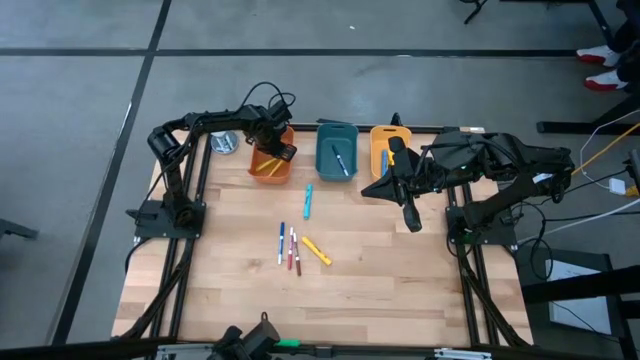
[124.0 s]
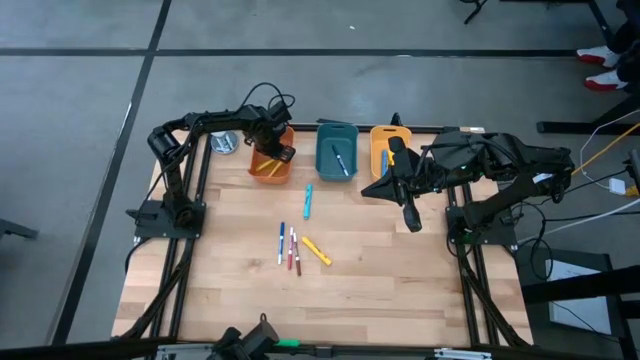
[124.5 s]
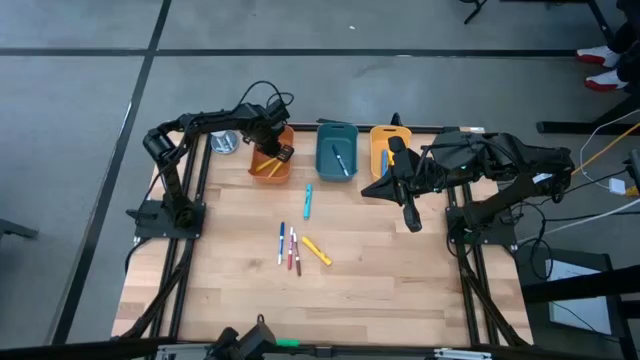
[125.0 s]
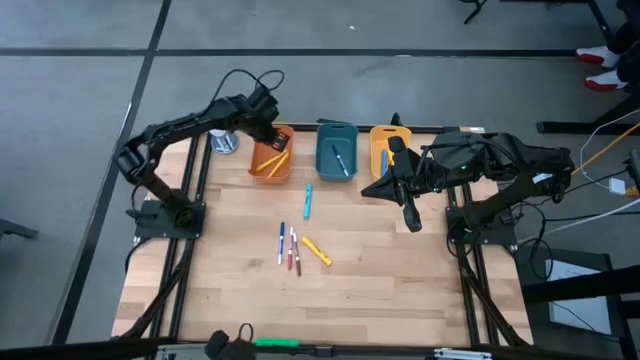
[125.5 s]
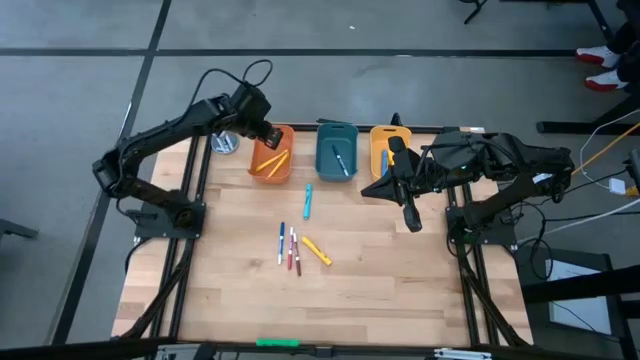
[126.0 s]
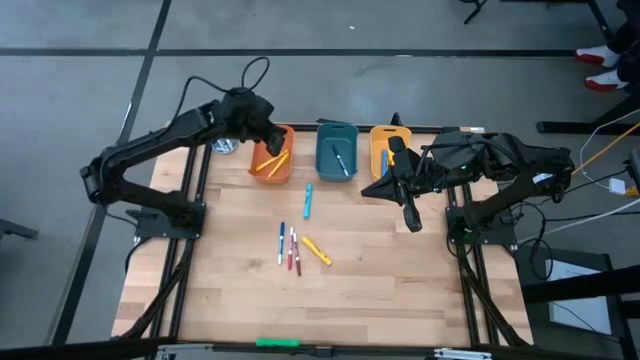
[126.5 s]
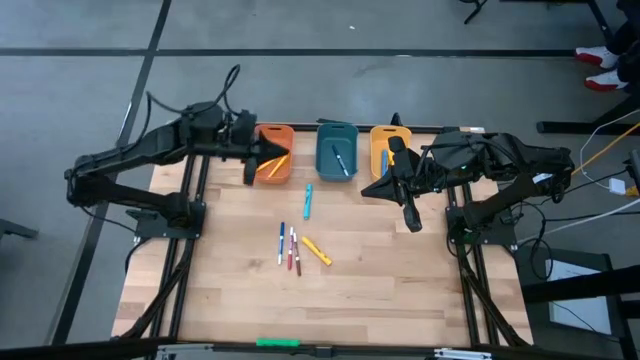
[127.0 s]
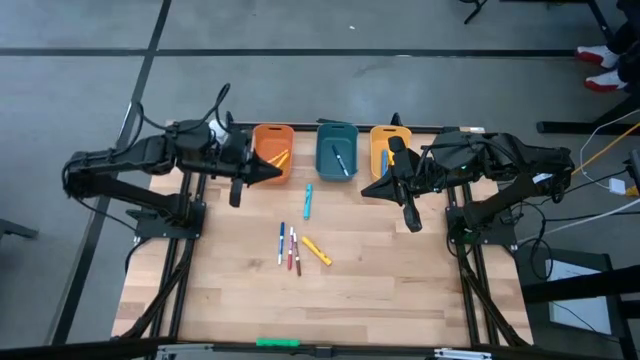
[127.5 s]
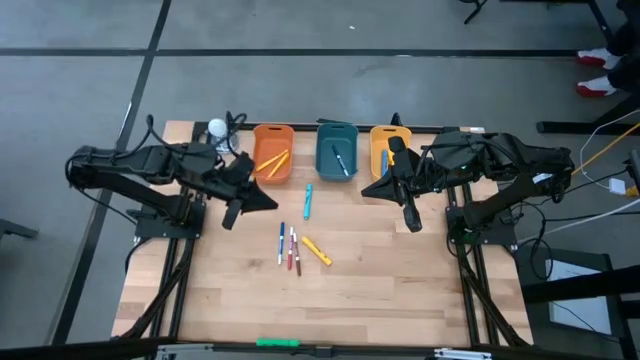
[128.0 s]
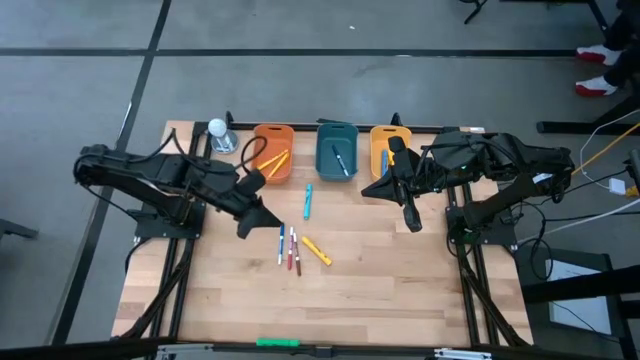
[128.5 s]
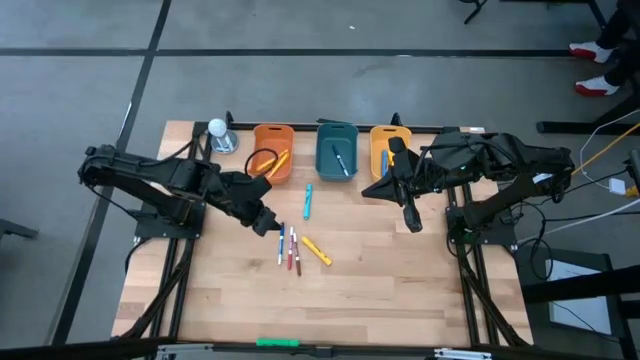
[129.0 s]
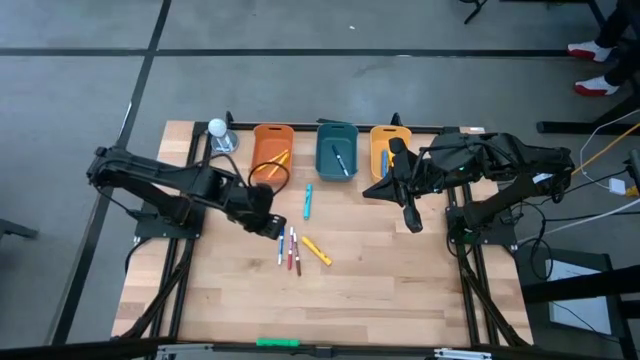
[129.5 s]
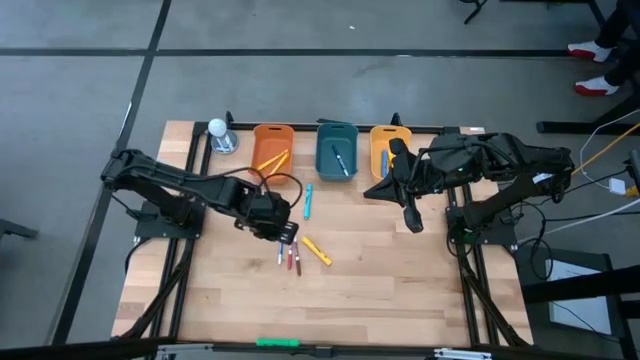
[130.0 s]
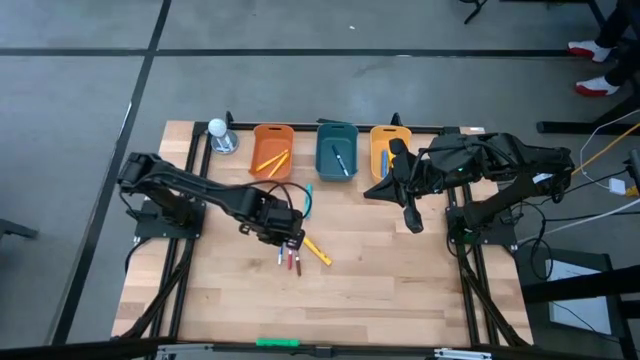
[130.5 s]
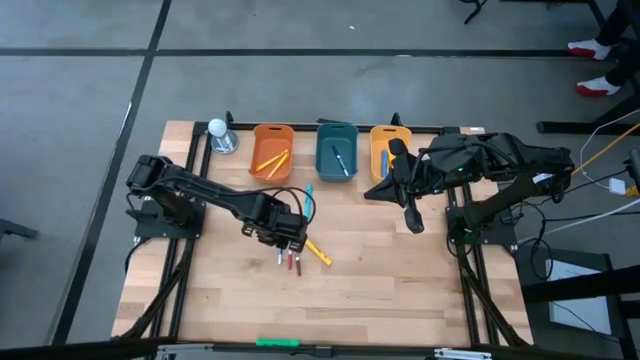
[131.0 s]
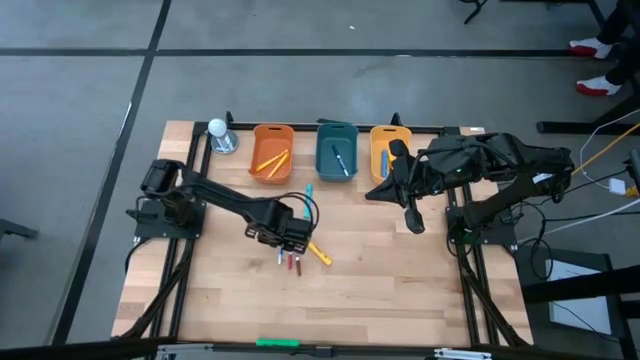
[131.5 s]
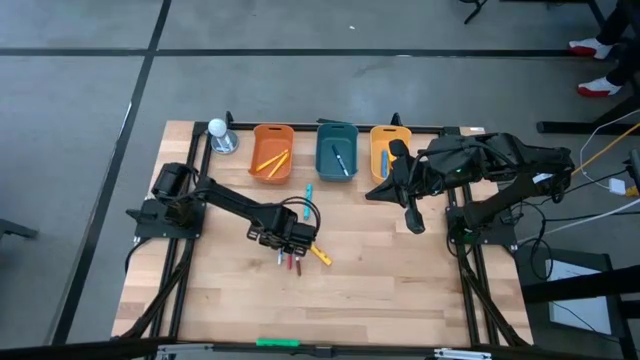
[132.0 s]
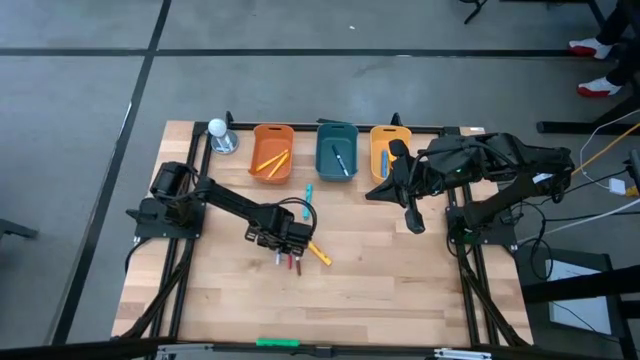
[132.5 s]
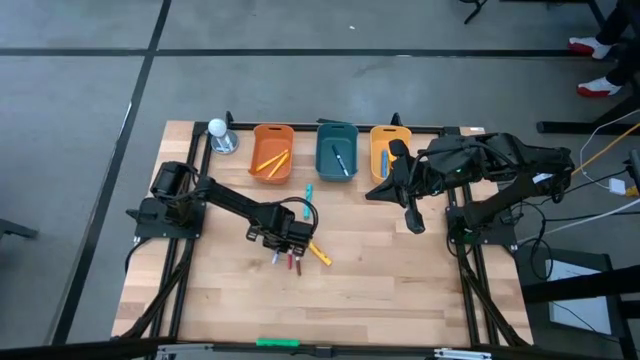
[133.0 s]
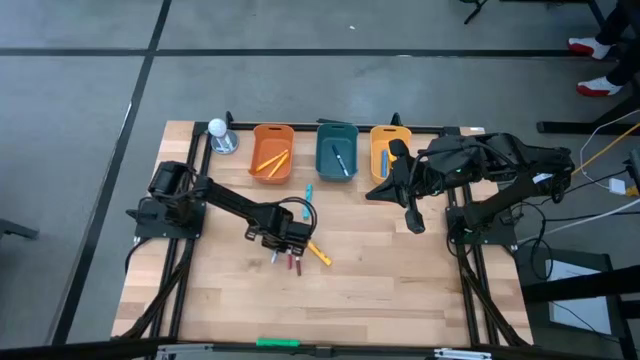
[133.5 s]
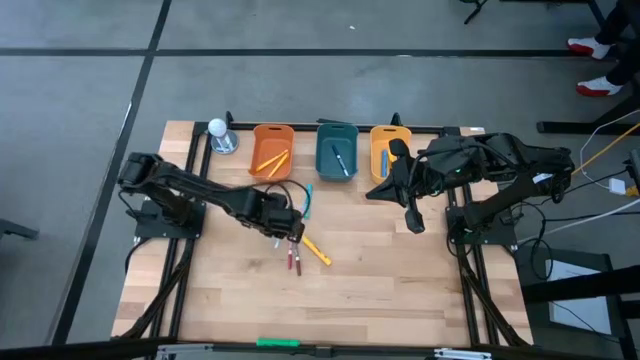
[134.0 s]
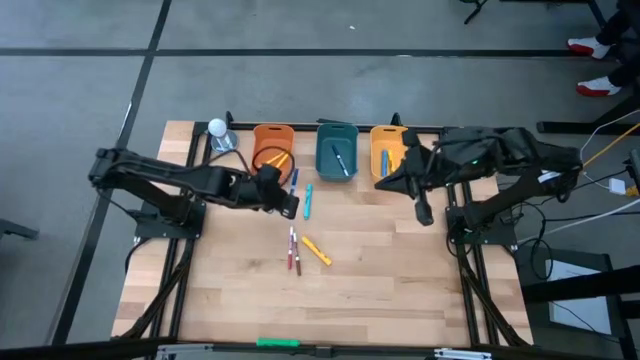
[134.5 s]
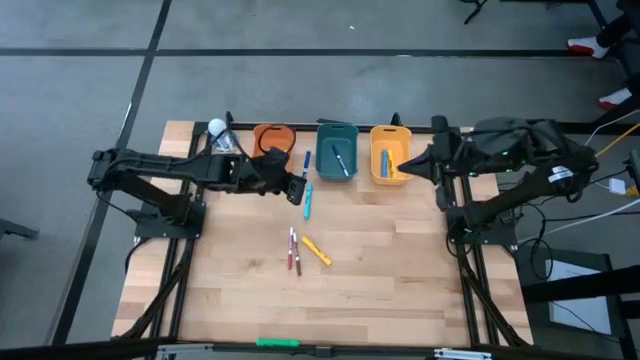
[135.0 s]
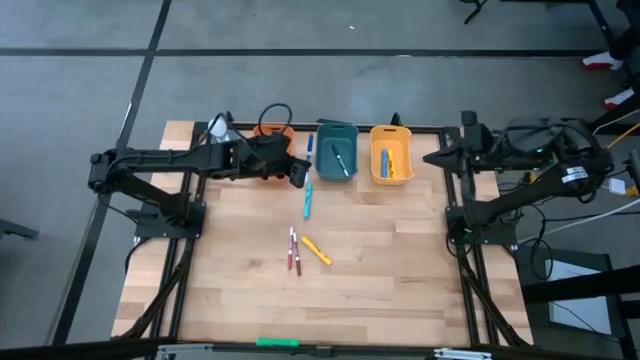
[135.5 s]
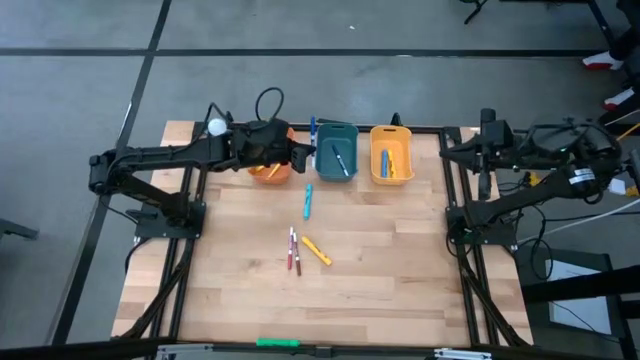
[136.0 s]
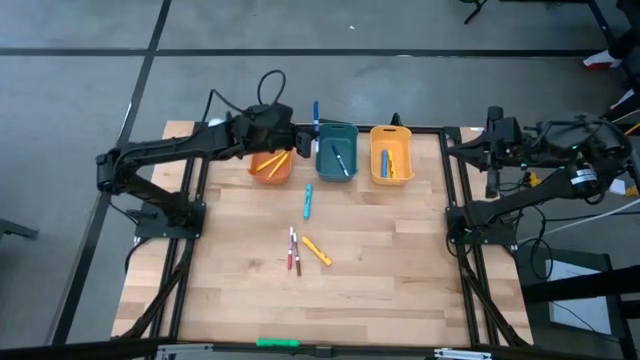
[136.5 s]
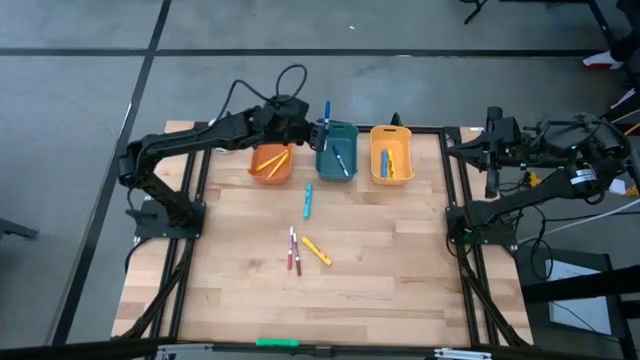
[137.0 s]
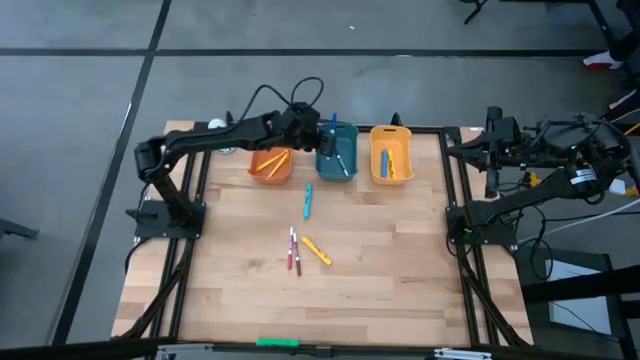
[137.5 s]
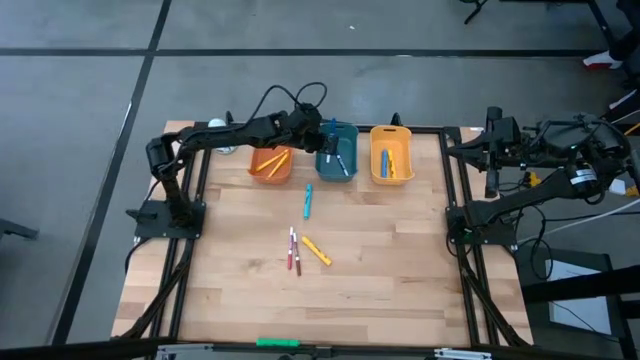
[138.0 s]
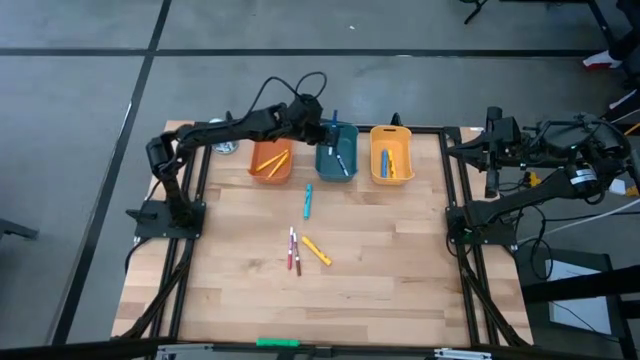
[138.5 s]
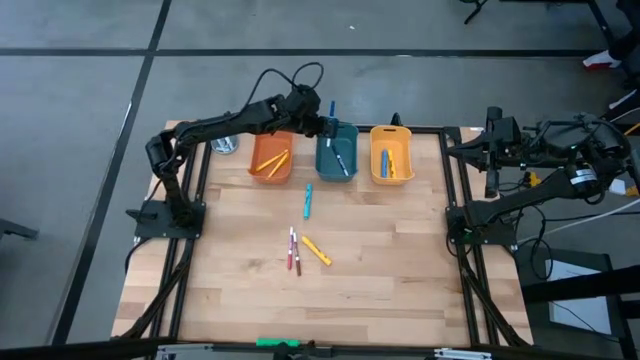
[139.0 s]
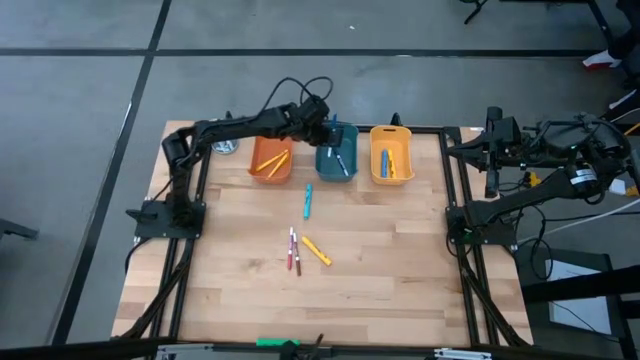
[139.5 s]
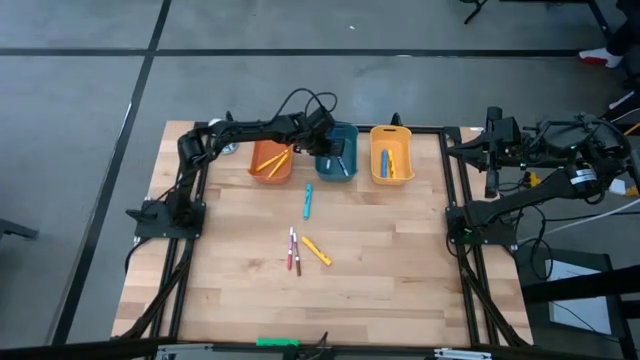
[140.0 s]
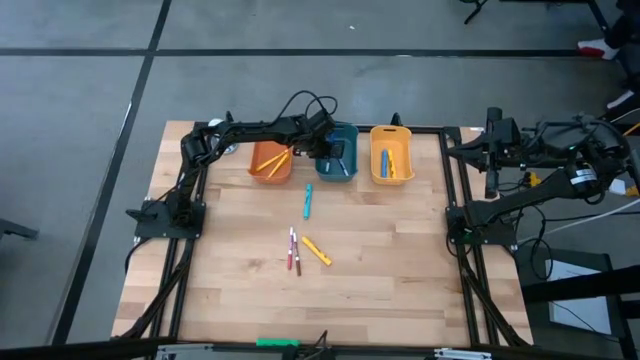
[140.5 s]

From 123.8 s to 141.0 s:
Task: Pick & Place Markers
Put the blue marker pen into the blue bin

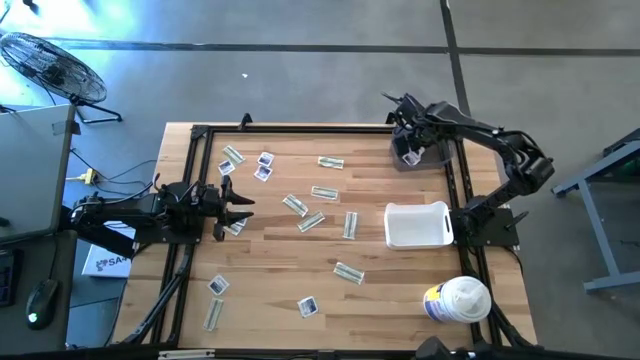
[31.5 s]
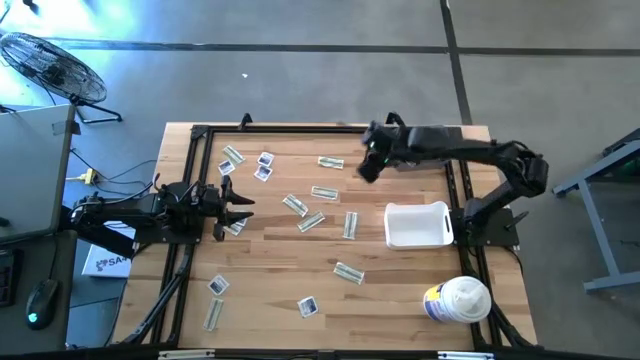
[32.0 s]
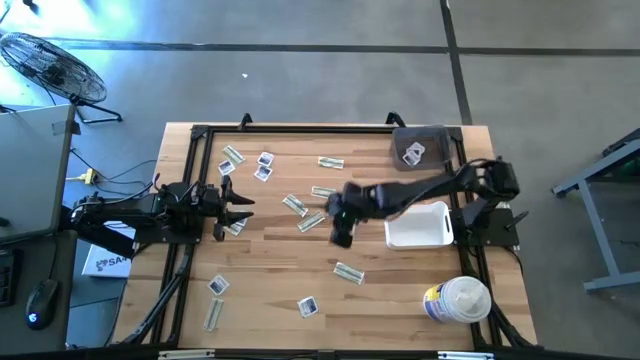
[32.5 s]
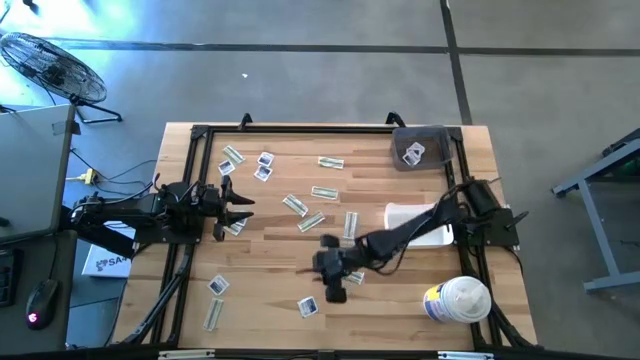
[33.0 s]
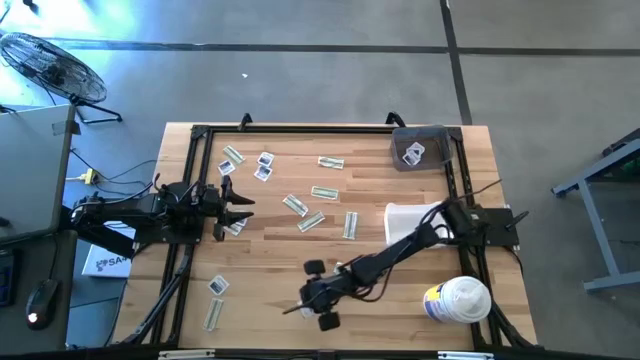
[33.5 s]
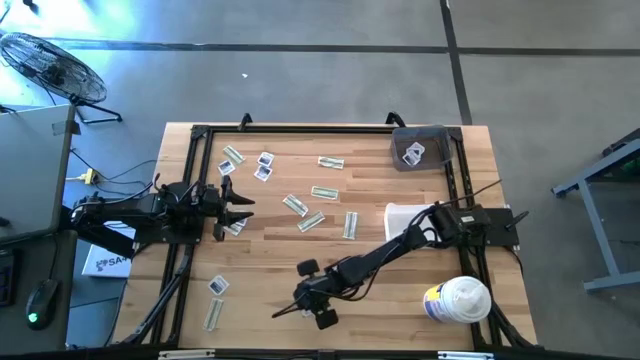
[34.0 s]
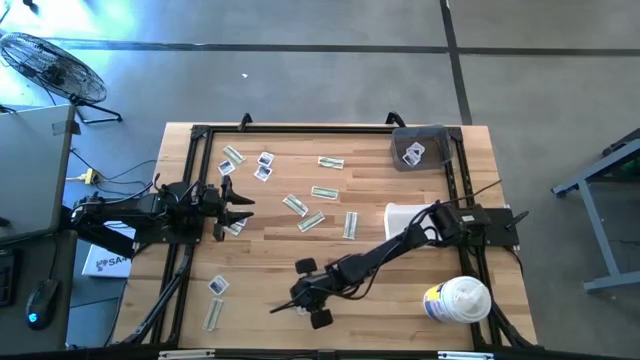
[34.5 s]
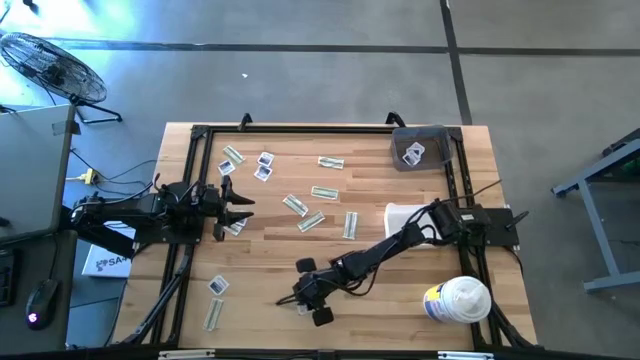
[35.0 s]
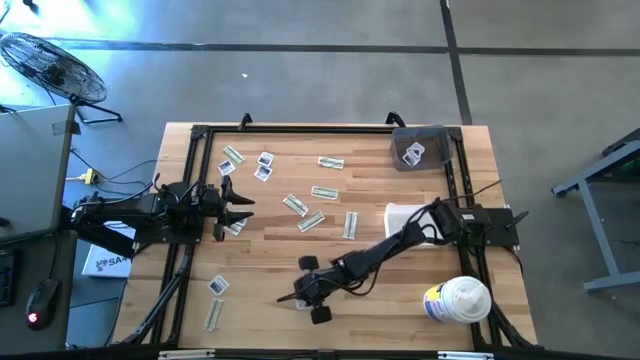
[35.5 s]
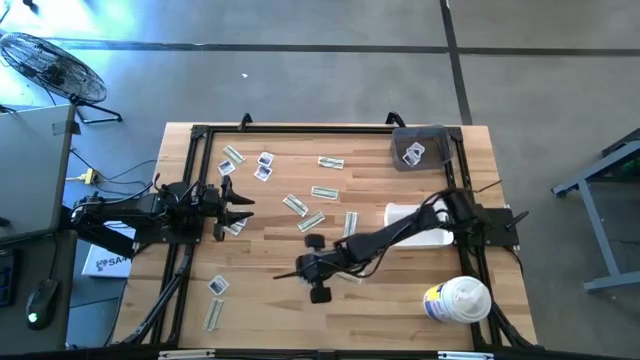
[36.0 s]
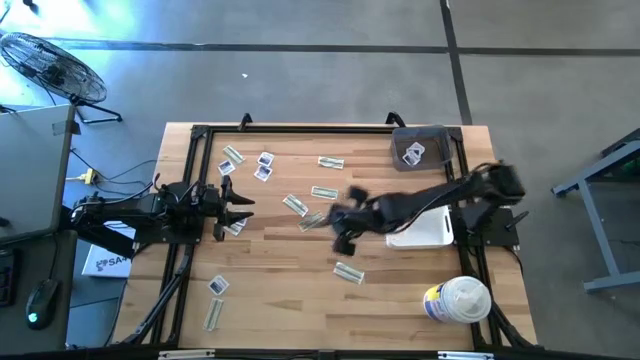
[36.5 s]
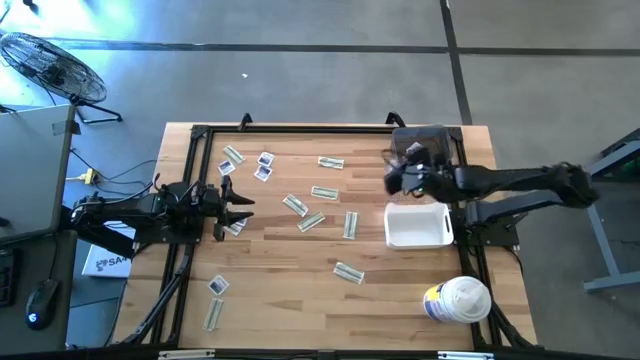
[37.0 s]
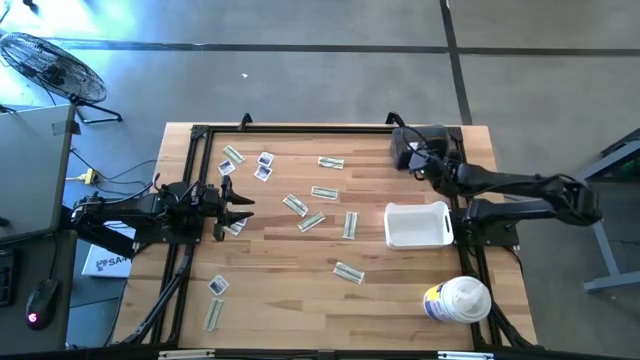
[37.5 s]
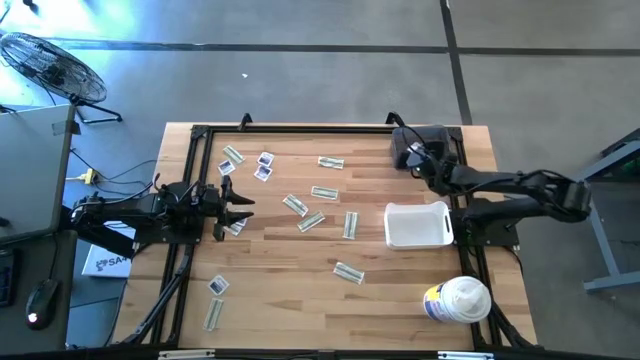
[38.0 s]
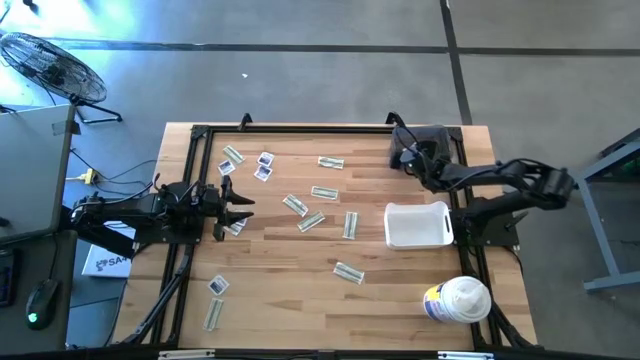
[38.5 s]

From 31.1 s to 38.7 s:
Task: Pick & Place First Aid Supplies
Put the alcohol pad into the black bin
